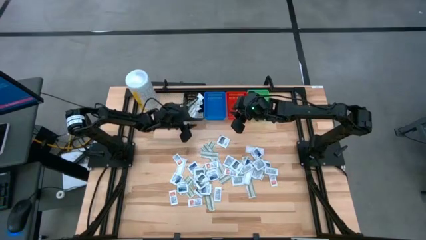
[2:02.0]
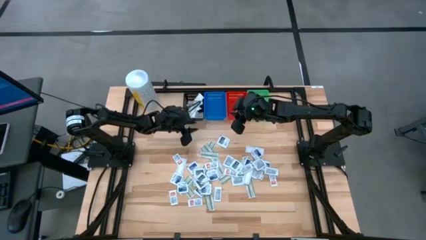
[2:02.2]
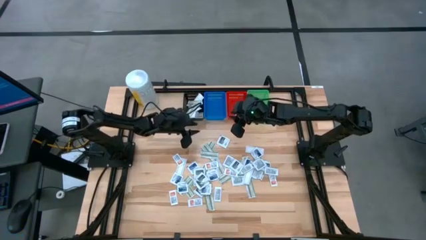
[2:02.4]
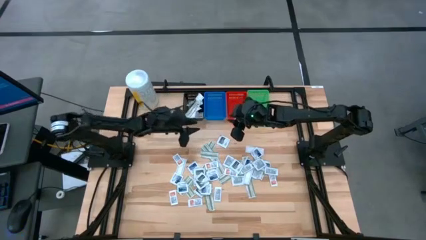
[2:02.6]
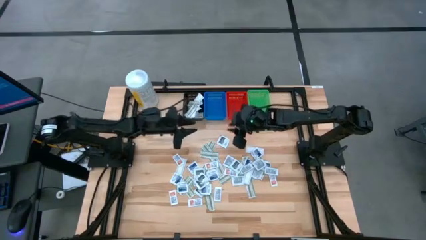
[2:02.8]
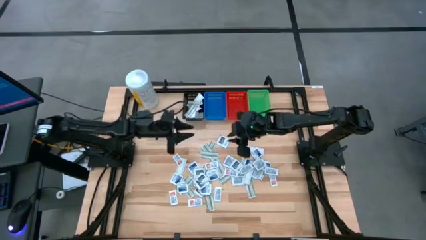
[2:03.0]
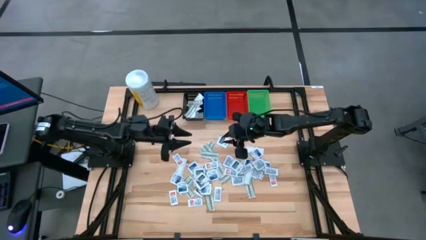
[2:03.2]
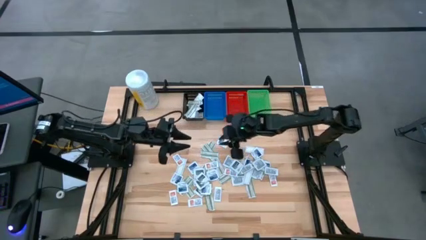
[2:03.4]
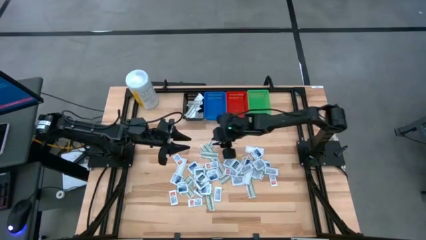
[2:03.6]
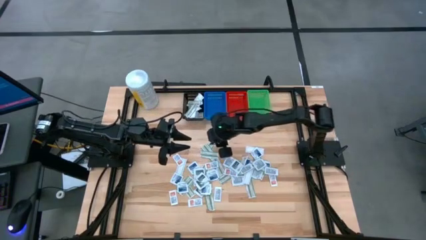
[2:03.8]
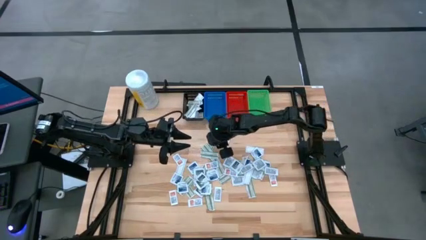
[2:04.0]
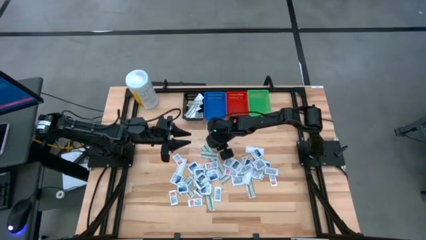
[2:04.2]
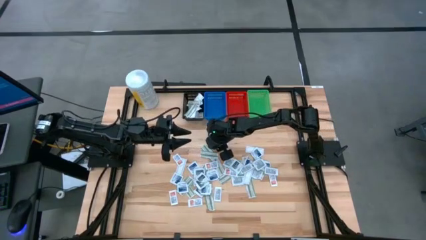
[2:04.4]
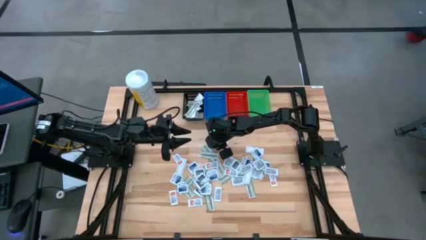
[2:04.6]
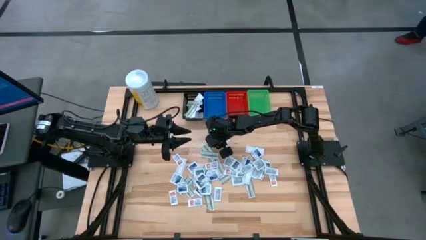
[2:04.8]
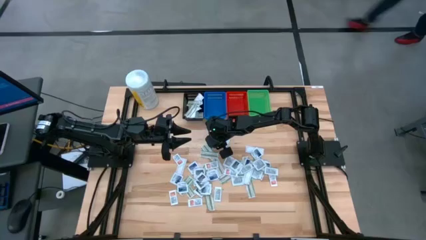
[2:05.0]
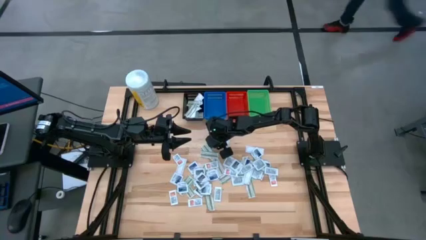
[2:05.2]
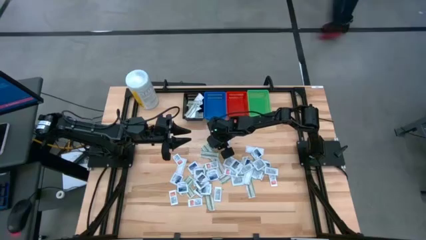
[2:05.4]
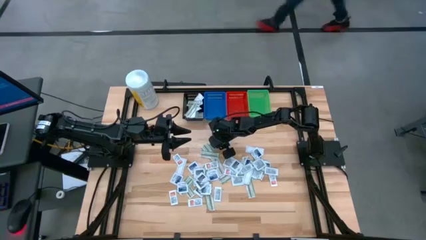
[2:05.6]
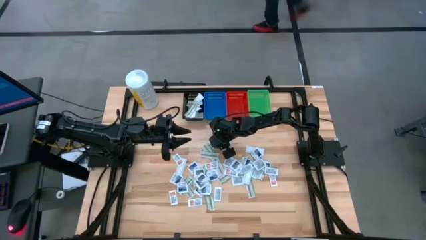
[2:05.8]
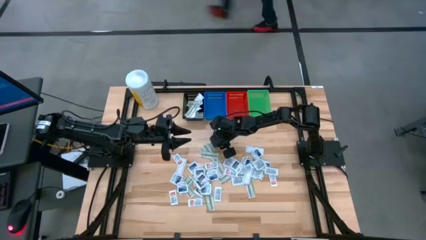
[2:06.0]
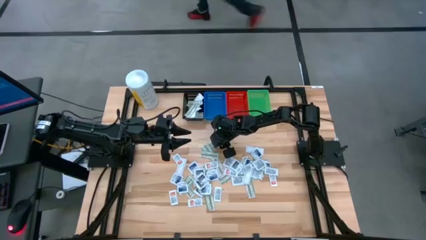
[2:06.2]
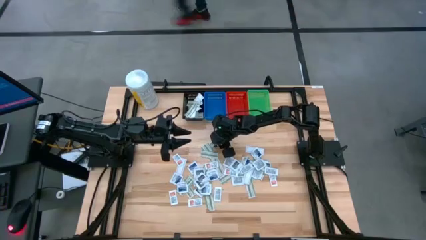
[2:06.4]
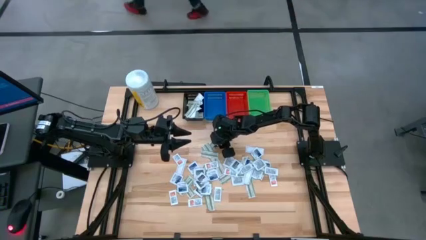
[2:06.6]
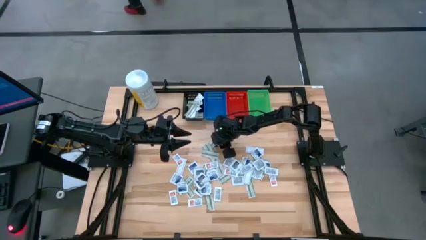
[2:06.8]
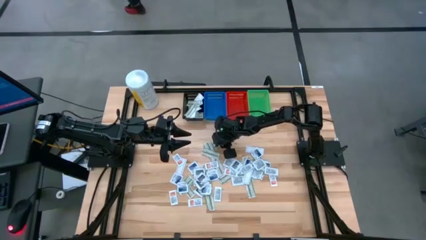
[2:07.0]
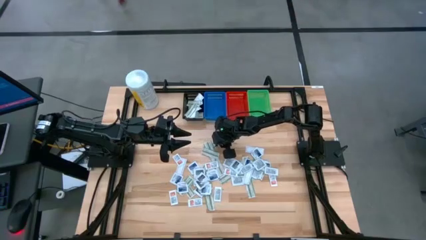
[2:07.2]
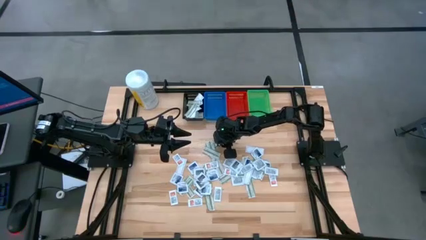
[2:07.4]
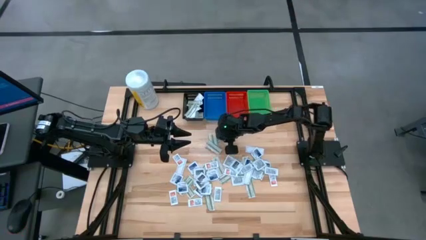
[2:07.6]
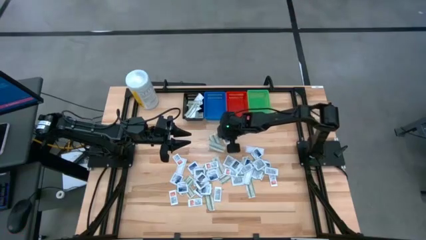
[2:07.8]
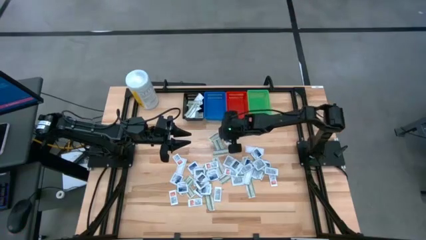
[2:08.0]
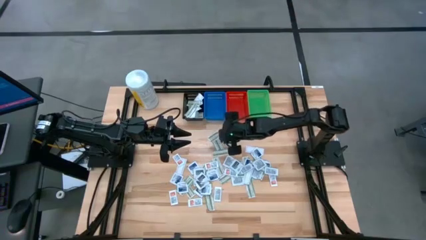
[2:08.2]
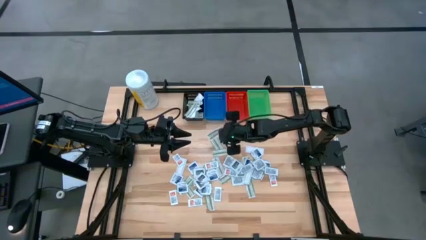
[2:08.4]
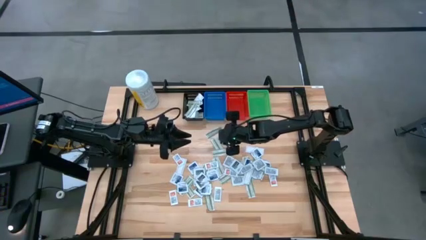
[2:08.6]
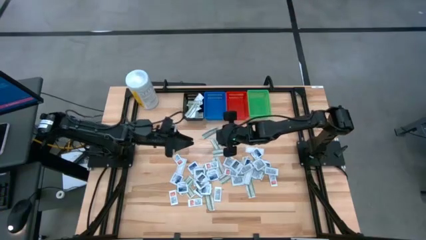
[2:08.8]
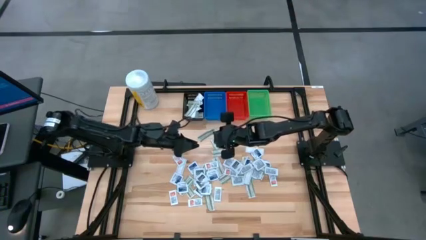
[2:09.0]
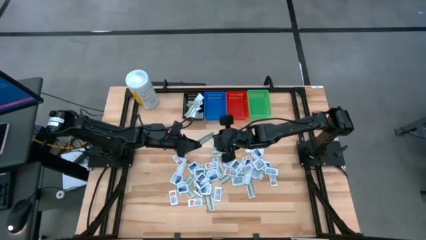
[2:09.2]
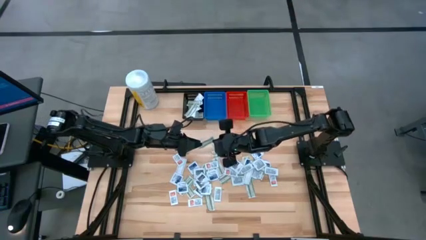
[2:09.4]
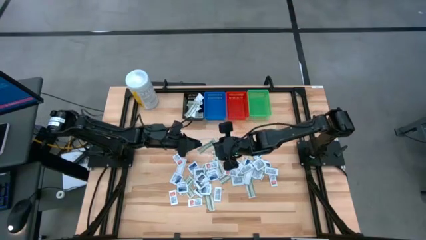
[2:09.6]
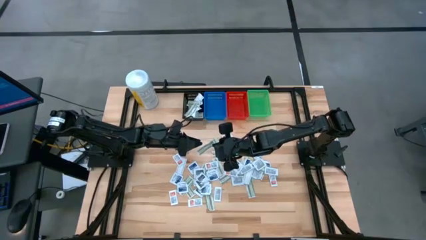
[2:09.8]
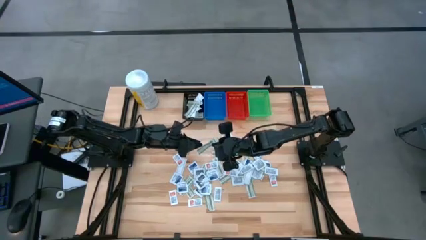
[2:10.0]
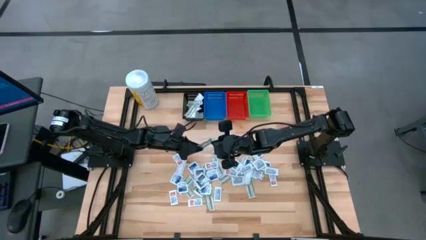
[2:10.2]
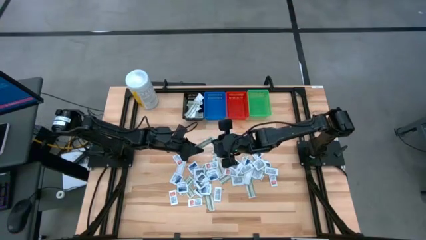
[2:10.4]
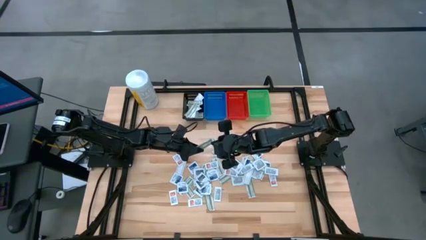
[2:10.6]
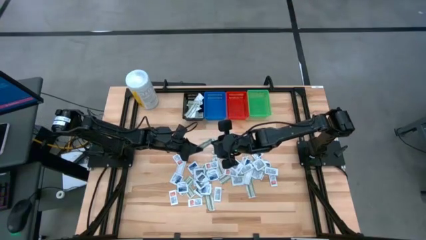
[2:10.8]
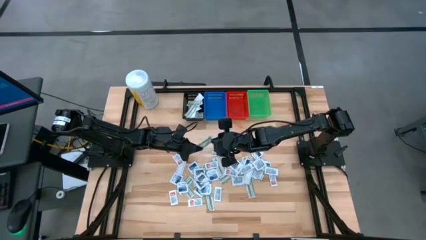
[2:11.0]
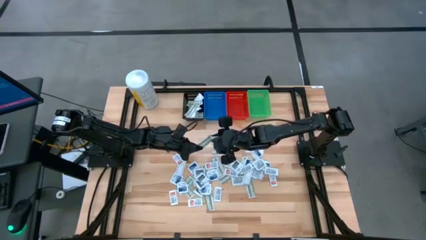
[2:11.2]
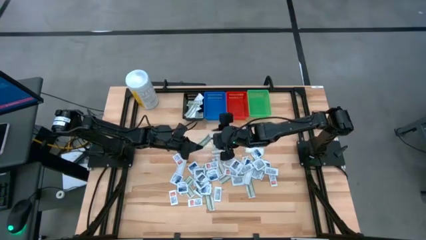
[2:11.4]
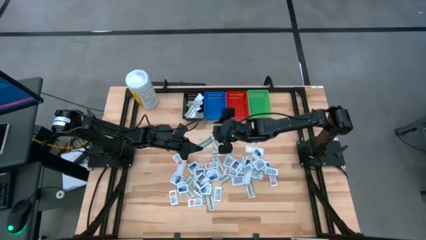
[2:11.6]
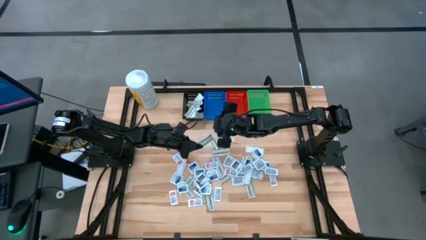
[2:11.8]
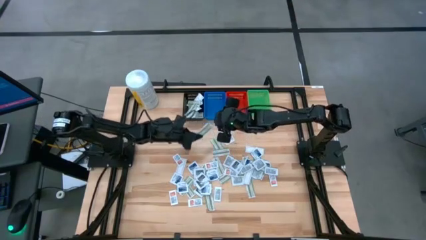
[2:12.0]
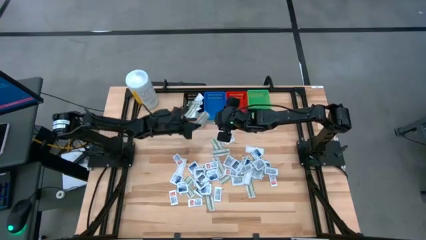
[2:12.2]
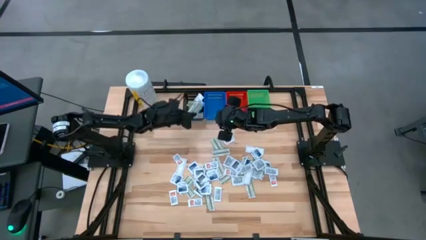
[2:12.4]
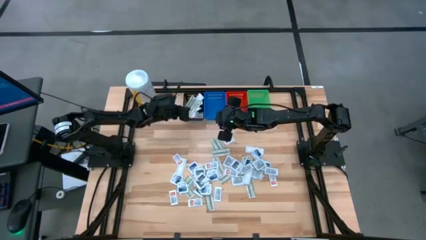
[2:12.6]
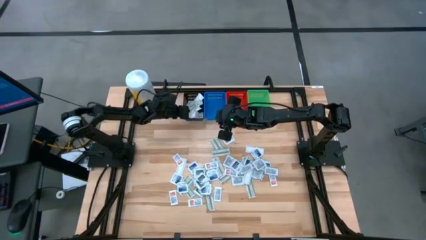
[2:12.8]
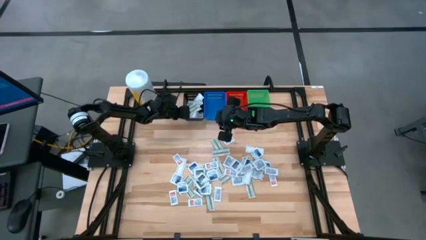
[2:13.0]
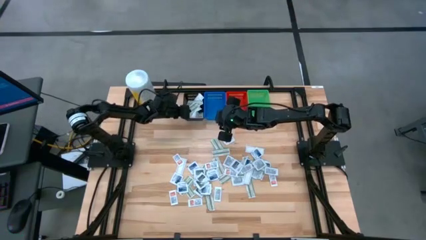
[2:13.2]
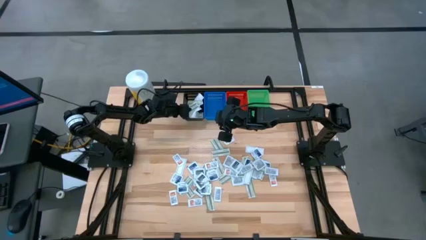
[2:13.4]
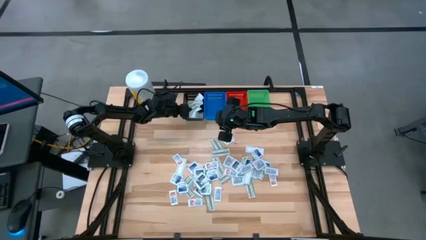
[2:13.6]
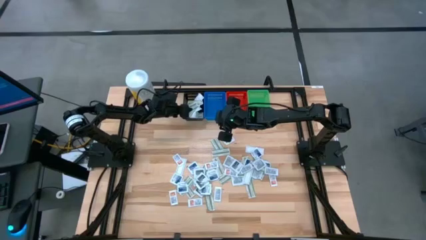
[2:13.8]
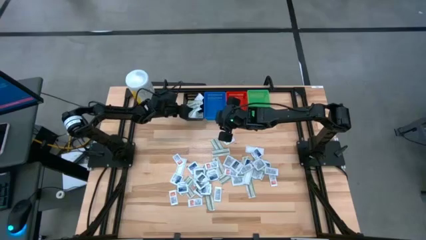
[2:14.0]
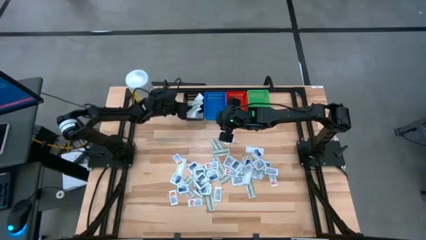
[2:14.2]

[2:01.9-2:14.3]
Task: Pick & Place First Aid Supplies
Put the green bandage pack in the black bin
